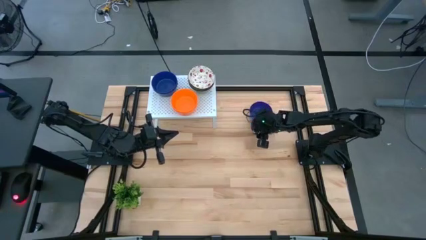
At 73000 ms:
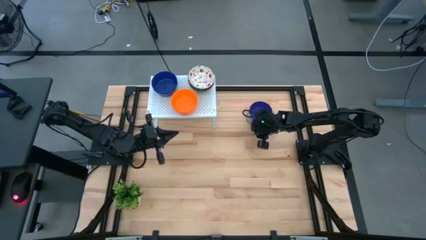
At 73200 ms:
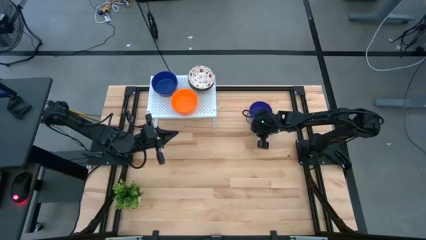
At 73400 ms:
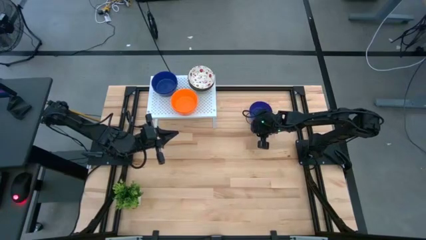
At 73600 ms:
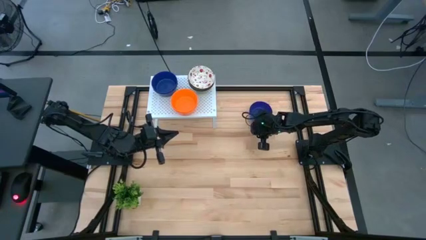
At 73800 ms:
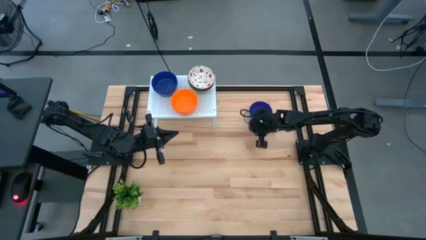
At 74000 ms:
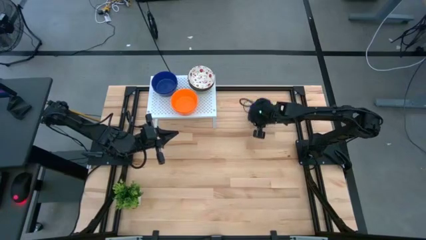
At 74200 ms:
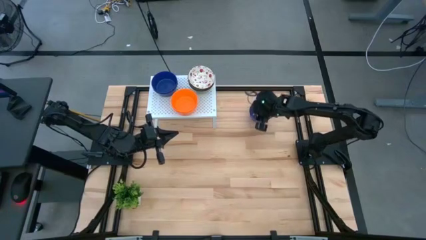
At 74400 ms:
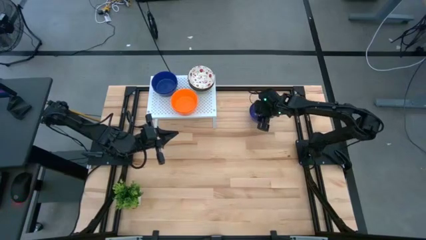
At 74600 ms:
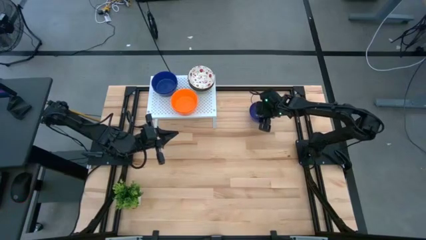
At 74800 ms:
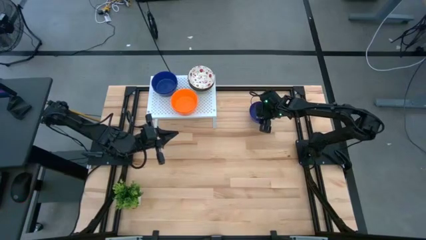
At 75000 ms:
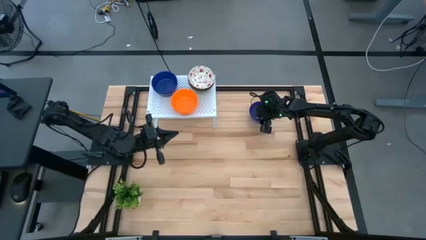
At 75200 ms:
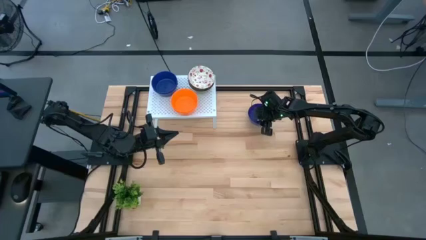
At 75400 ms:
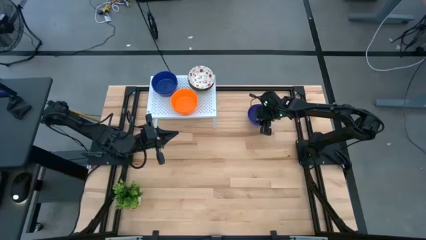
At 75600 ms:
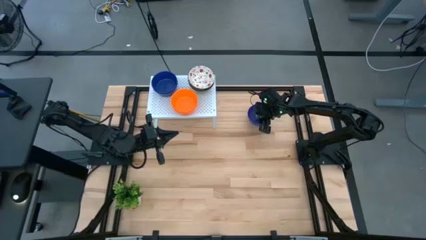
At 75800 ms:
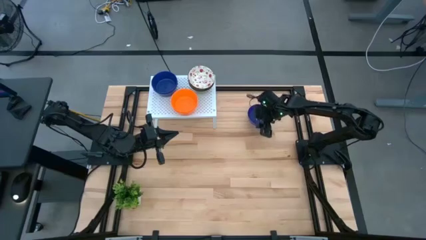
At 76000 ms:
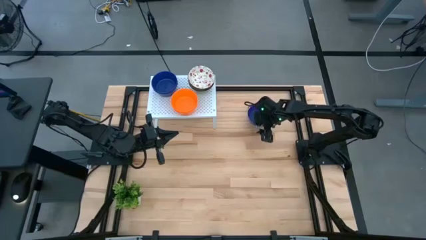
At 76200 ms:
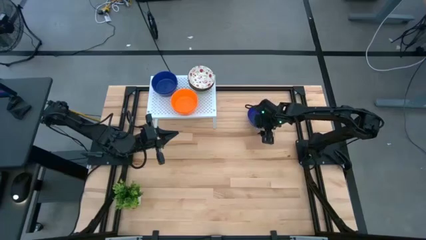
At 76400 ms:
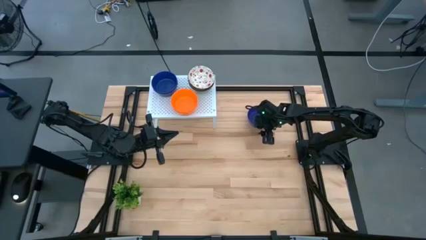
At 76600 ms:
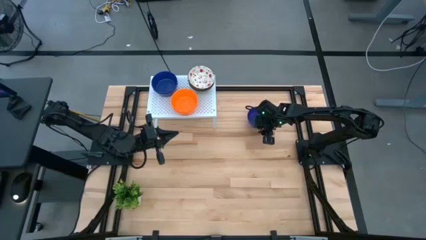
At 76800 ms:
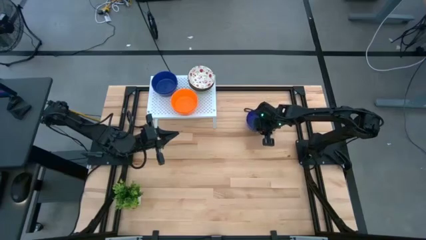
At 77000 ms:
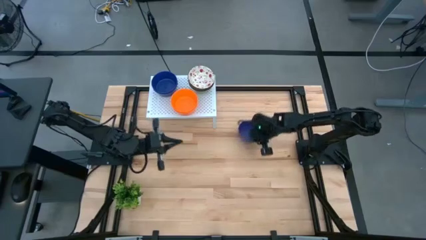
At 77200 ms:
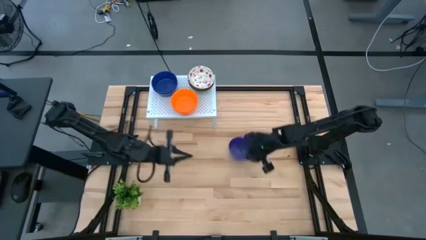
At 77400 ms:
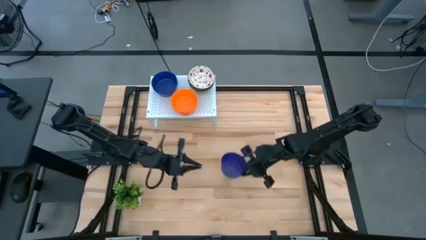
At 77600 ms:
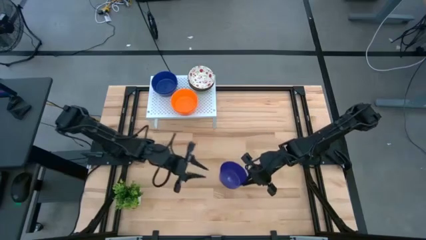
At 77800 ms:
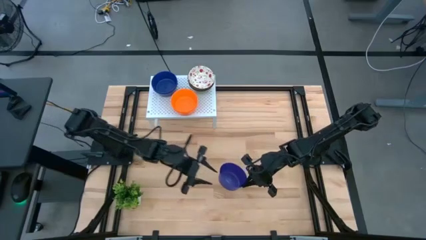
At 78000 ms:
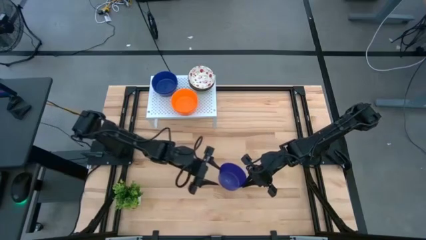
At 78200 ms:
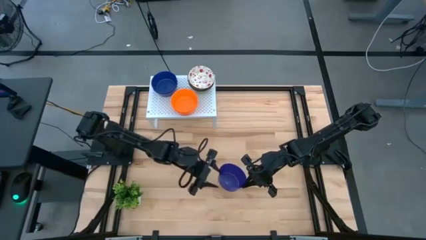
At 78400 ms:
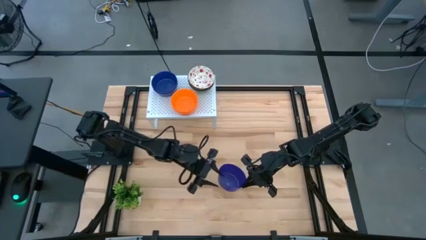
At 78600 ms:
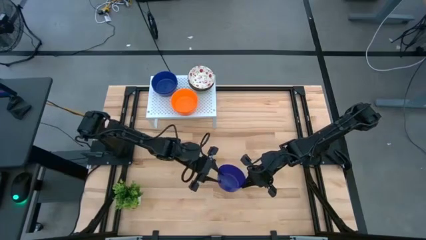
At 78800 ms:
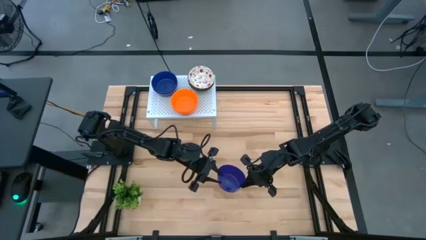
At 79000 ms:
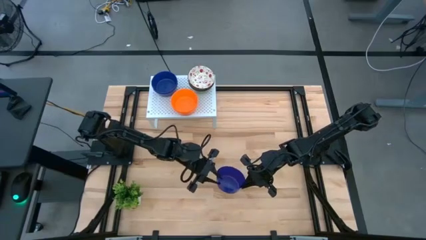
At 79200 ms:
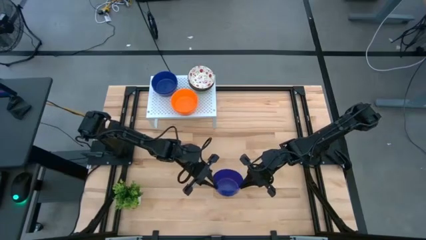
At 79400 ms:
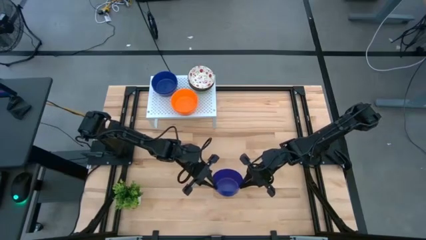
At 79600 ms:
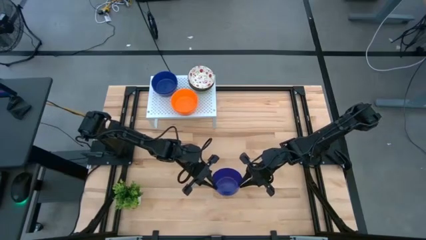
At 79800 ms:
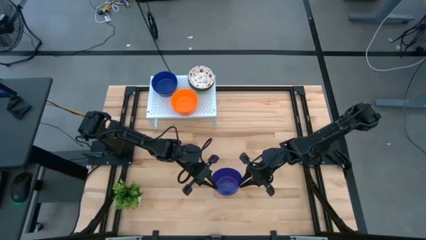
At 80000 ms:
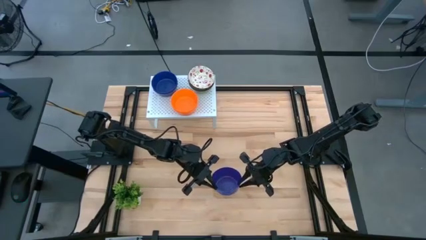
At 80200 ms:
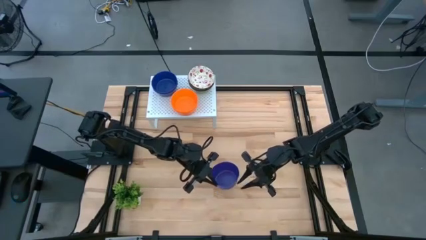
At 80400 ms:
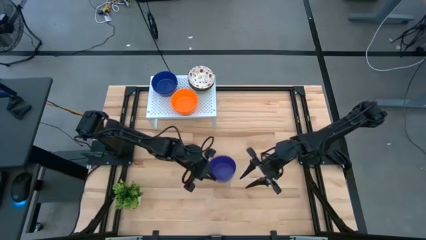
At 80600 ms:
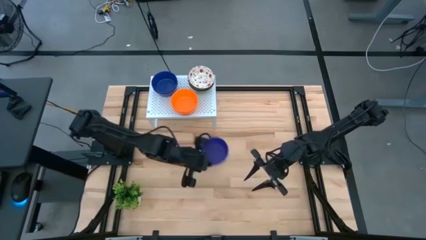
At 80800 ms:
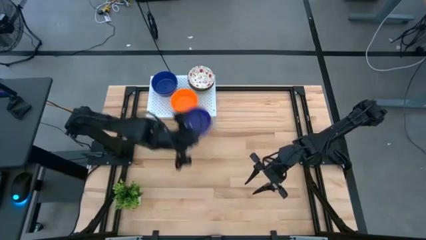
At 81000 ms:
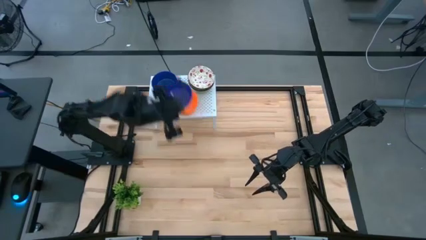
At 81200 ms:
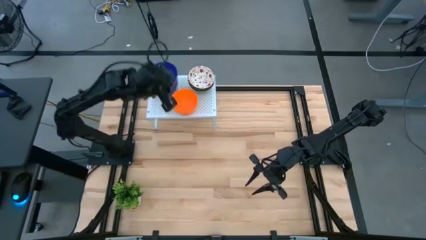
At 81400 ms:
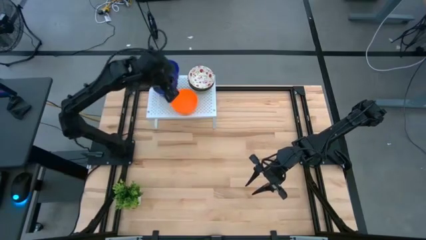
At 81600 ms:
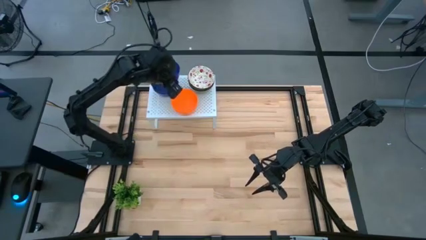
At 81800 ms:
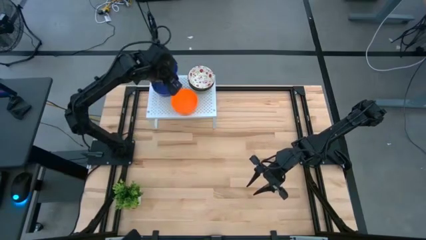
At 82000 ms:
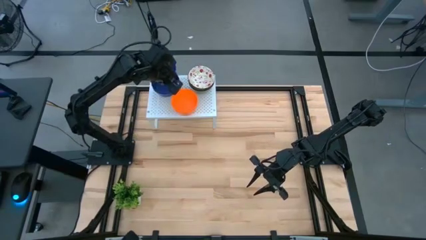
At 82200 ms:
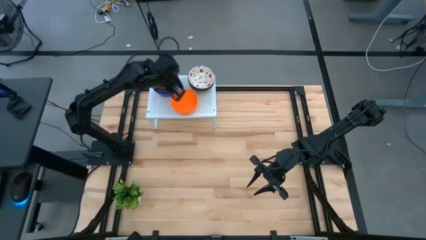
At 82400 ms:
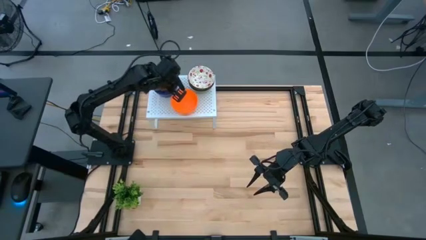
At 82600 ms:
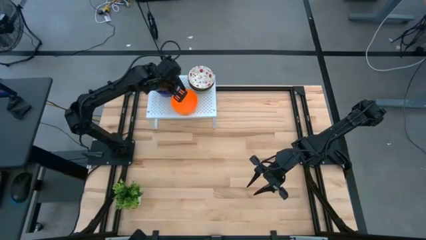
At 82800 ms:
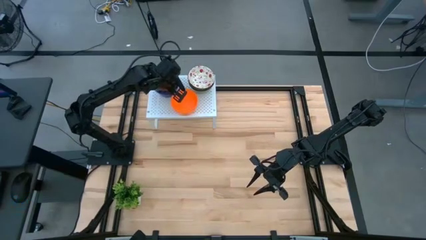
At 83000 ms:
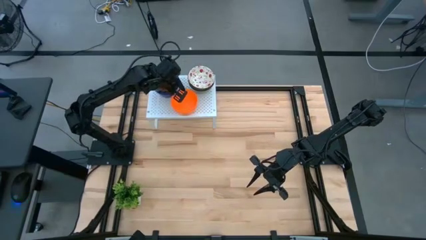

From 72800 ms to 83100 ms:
Task: Pick & Place Mini bowls
Stack the blue bowl on top of the blue bowls on the shelf

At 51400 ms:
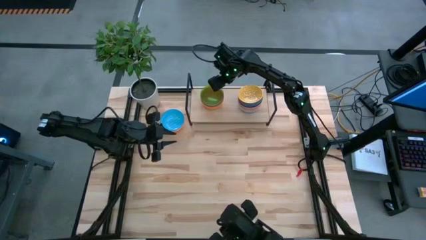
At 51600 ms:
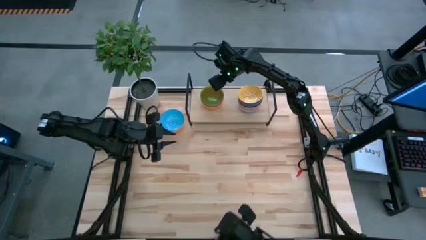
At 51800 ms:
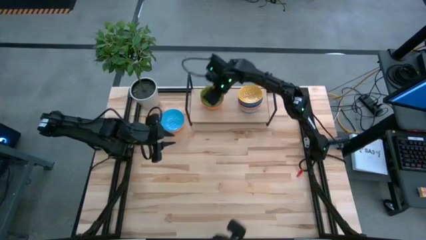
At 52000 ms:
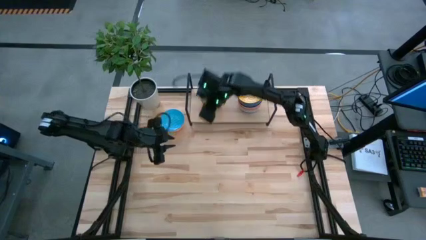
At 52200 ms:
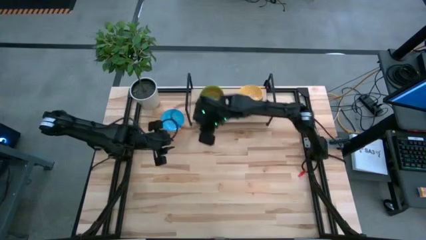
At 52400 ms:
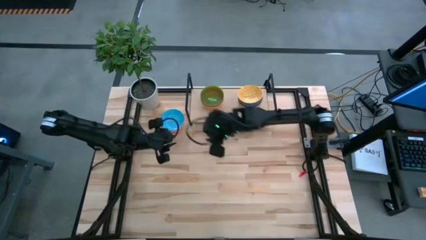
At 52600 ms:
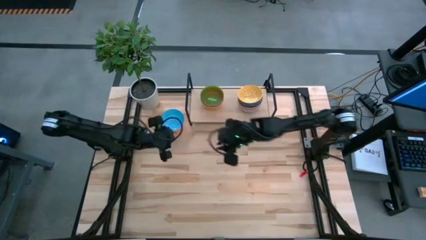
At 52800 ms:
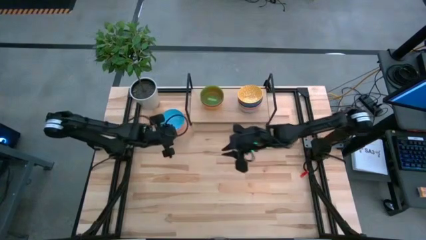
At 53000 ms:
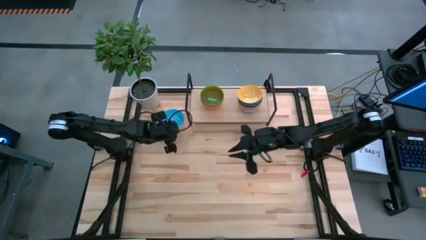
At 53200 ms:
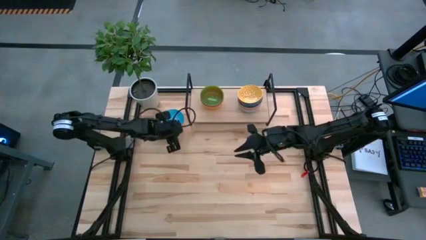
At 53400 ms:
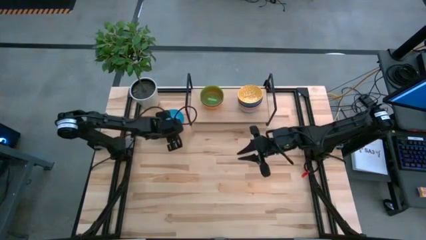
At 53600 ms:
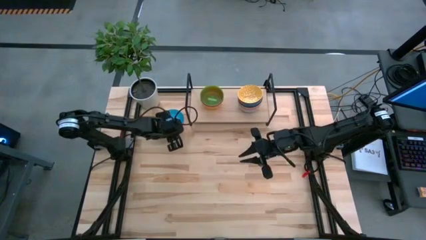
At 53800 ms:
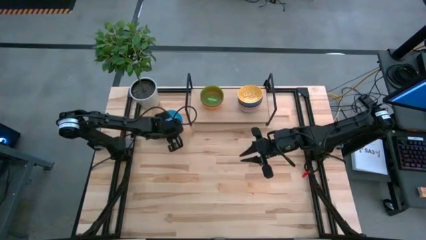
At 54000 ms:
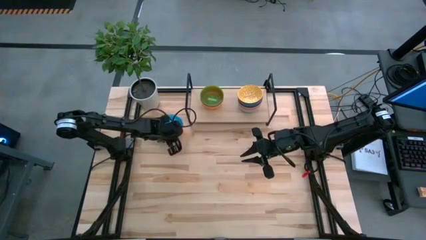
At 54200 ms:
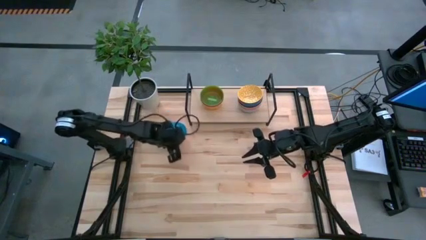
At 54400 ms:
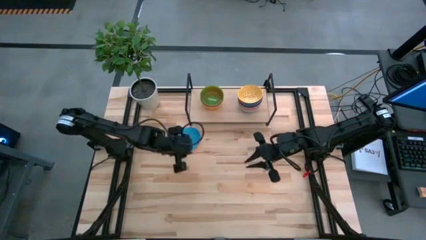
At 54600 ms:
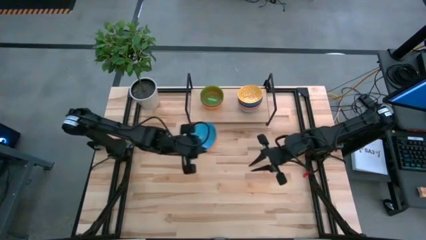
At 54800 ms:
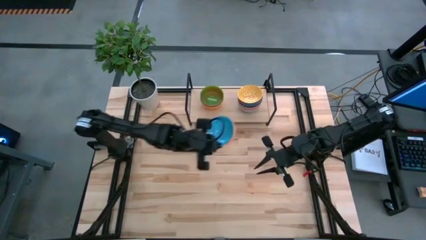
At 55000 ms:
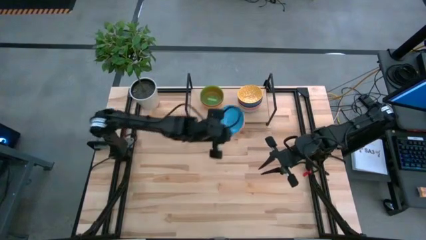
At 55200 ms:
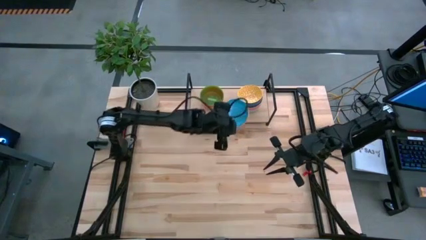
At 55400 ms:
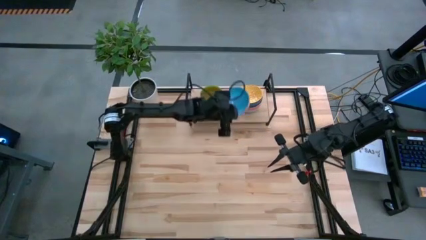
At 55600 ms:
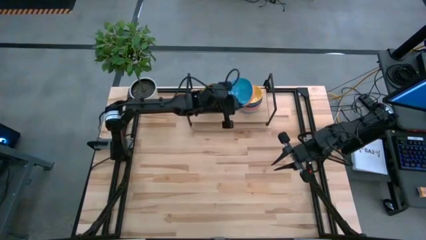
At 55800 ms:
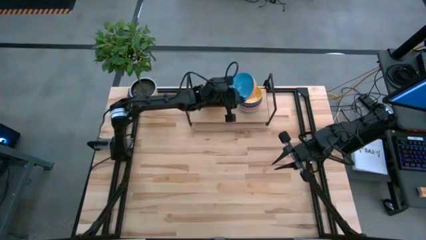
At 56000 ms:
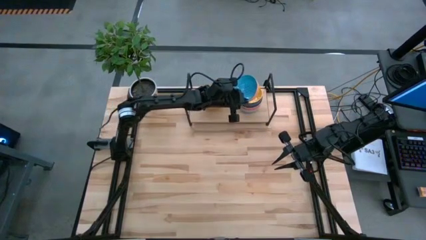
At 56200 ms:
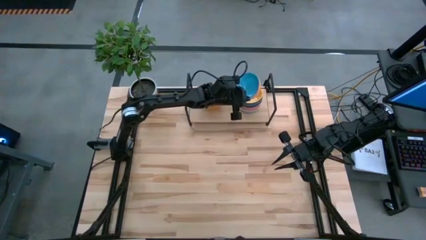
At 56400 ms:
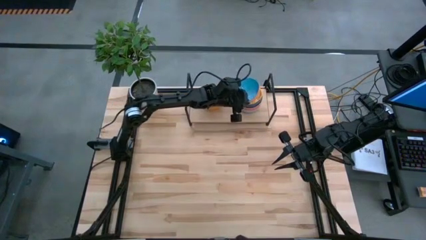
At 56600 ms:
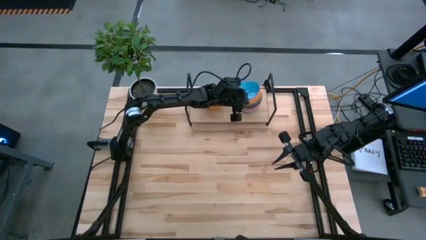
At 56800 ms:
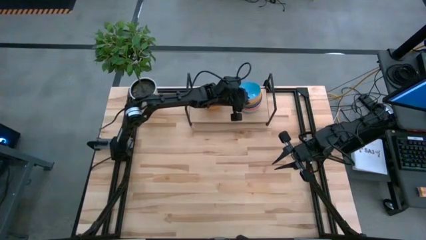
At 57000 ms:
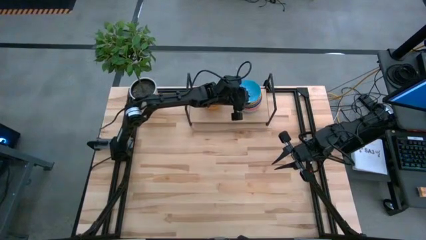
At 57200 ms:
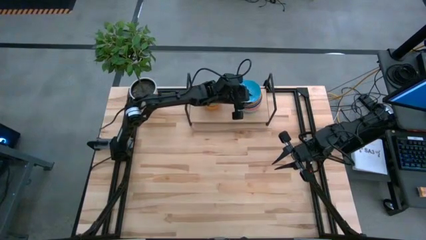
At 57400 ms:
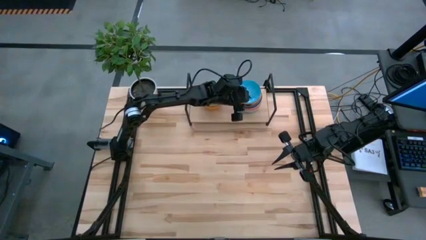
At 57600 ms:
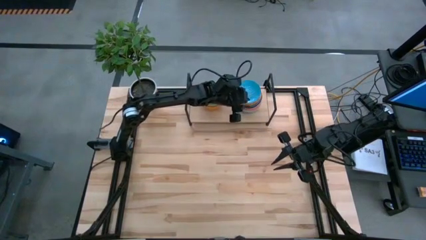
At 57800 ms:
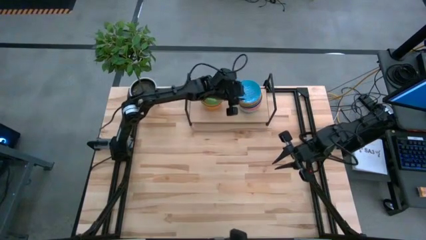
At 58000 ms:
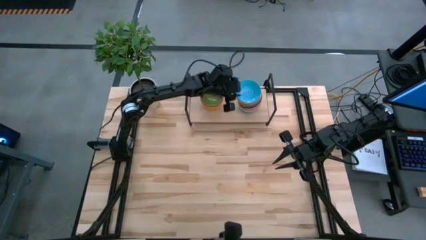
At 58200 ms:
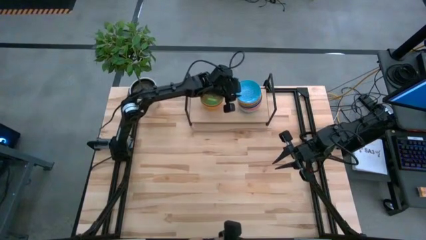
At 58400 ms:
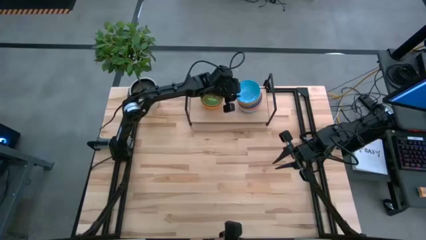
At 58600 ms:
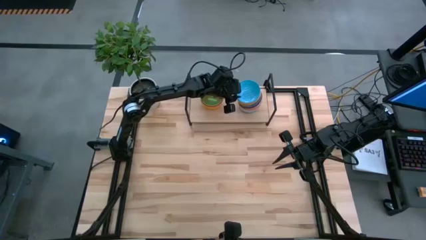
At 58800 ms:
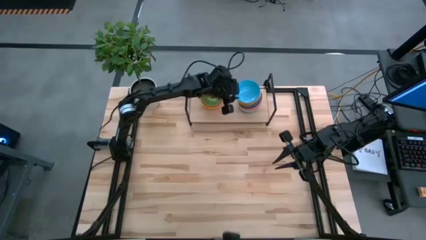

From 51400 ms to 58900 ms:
Task: Place and stack bowls onto a shelf
Stack the light blue patterned bowl on top of the yellow patterned bowl on the shelf
